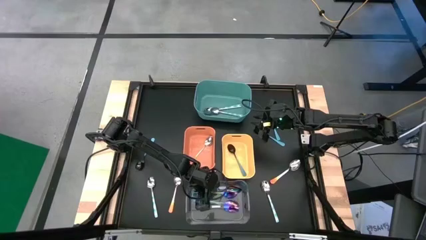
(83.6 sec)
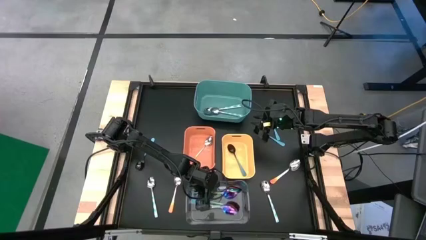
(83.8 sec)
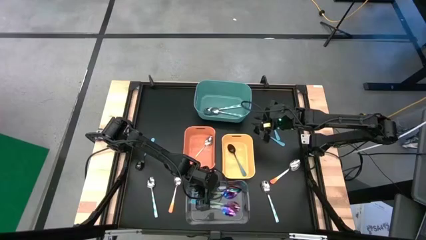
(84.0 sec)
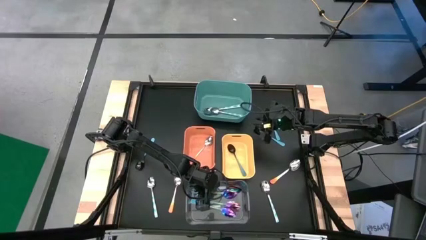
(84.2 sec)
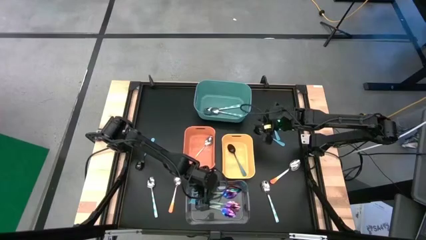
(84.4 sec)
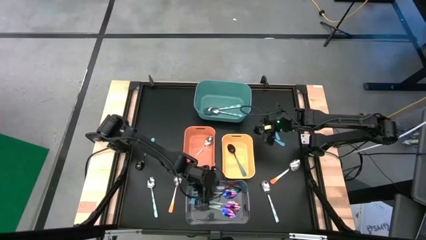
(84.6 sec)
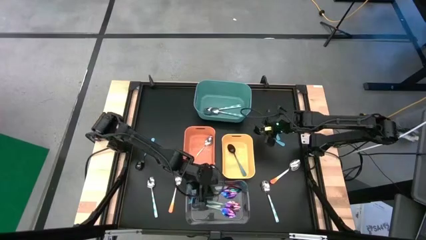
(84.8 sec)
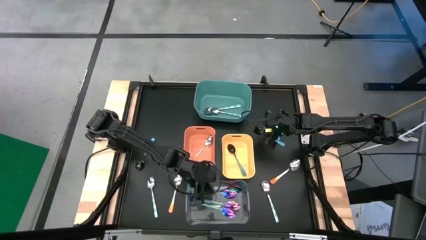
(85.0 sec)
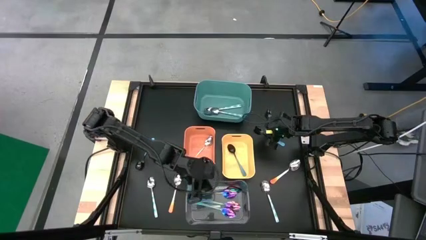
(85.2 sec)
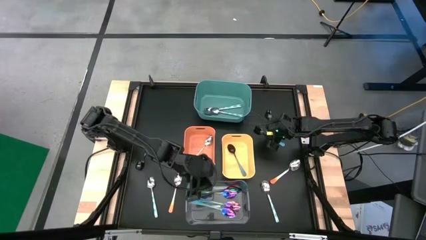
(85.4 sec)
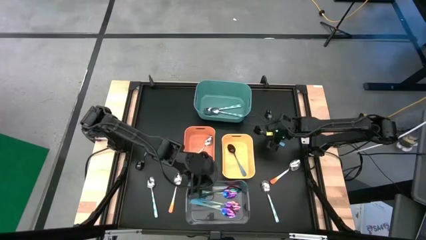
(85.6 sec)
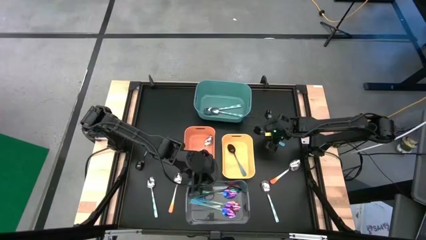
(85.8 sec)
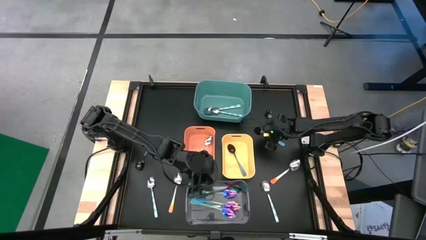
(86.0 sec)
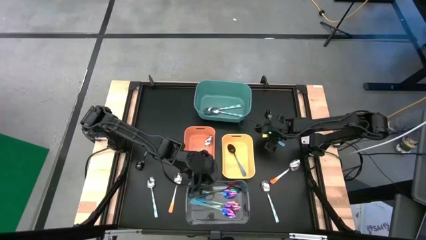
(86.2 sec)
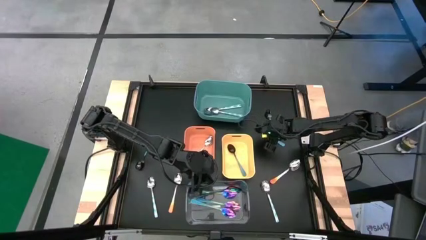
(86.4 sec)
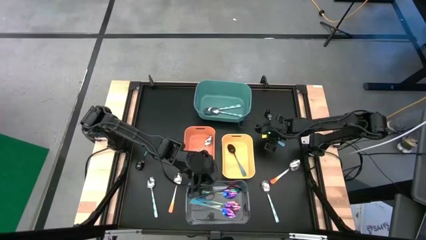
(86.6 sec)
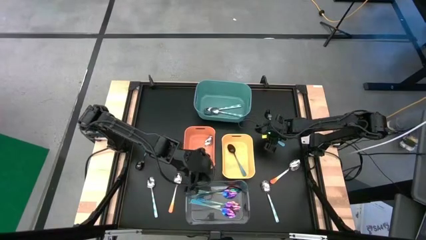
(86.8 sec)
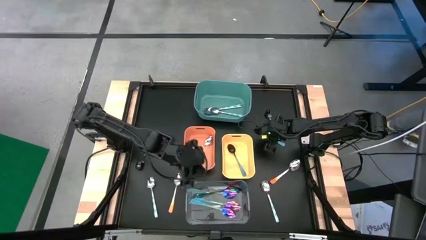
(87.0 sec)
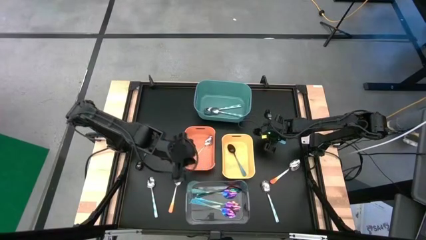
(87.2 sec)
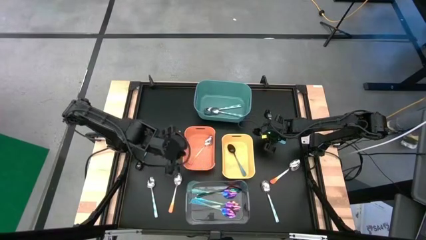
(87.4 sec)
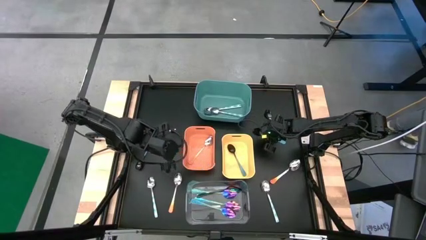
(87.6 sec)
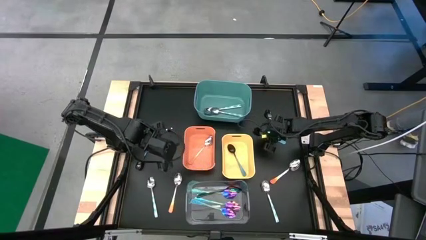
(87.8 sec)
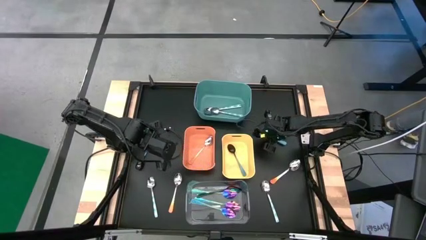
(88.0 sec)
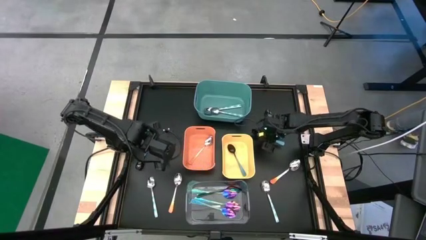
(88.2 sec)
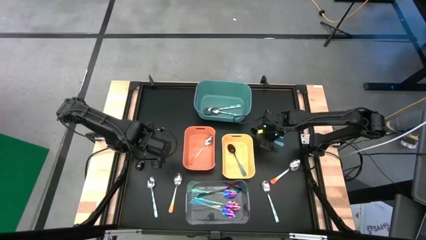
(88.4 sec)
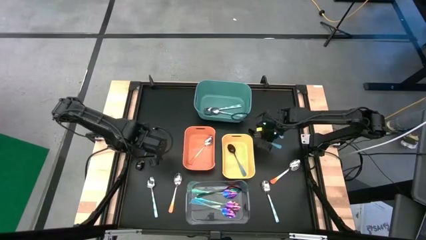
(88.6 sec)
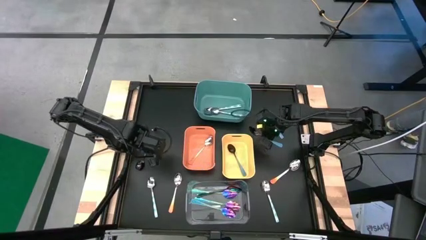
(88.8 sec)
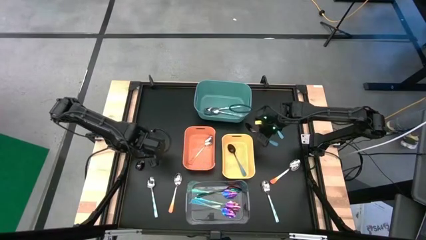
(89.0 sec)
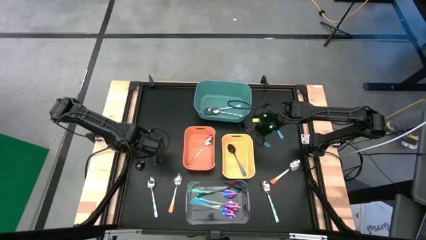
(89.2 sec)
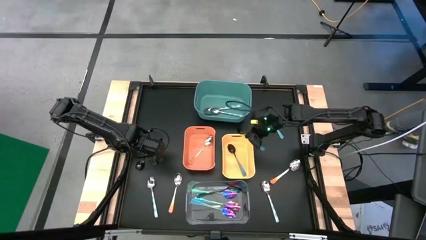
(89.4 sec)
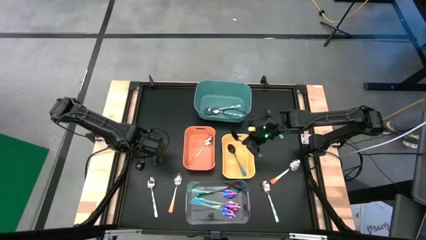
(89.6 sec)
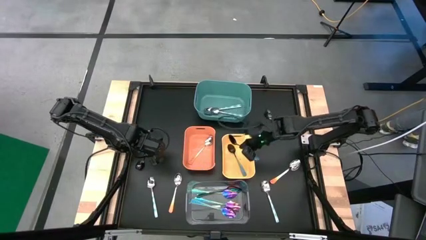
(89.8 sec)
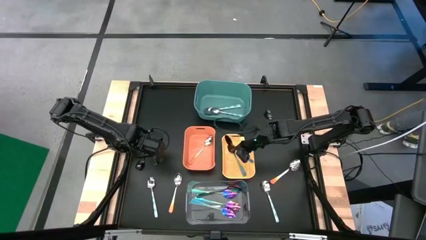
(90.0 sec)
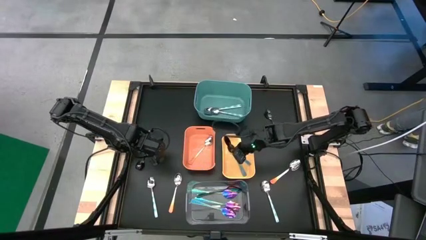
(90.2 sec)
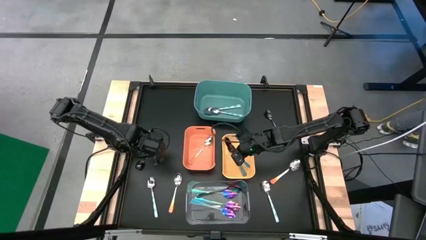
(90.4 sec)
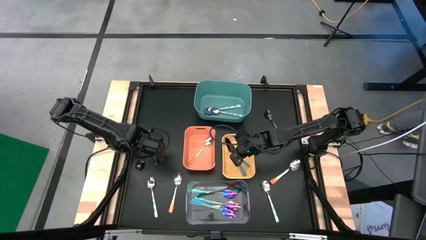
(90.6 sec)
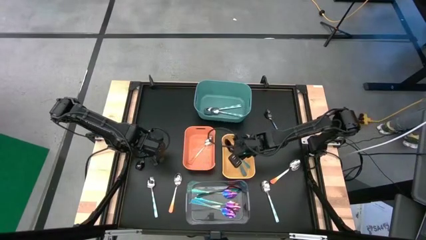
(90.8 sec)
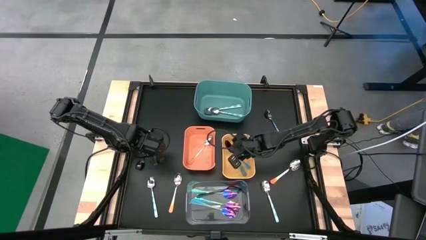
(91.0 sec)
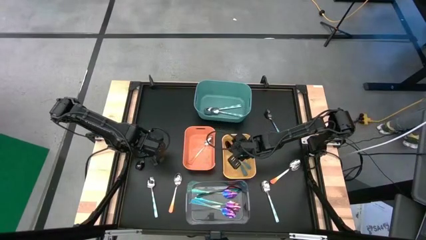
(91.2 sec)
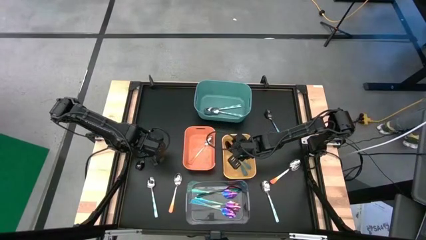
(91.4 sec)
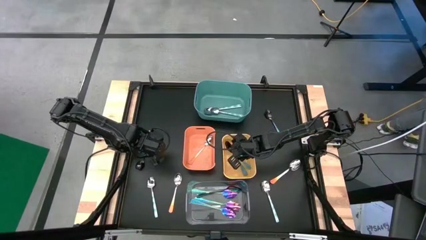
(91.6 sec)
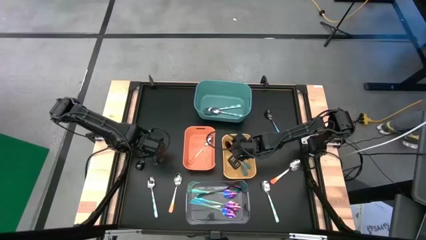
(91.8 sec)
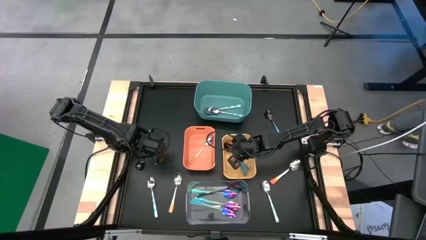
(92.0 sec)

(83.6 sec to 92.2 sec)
Task: Sort silverware by color (type)
Put the light blue spoon into the yellow bin

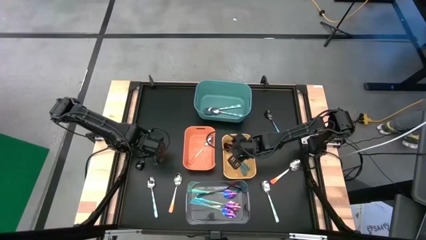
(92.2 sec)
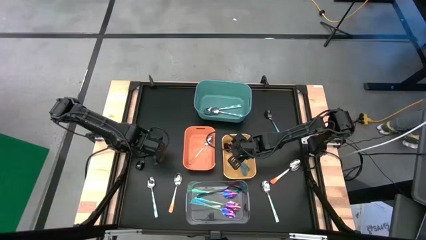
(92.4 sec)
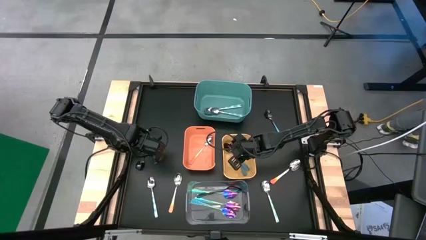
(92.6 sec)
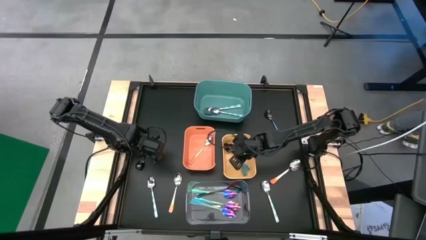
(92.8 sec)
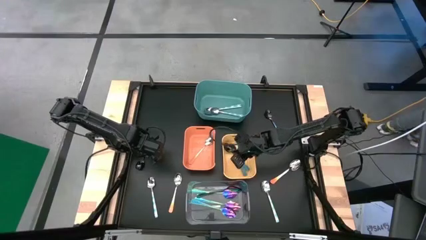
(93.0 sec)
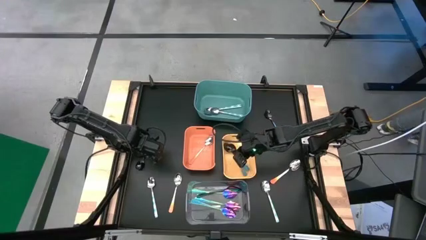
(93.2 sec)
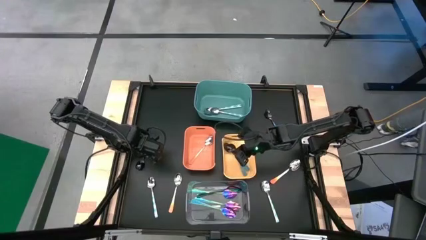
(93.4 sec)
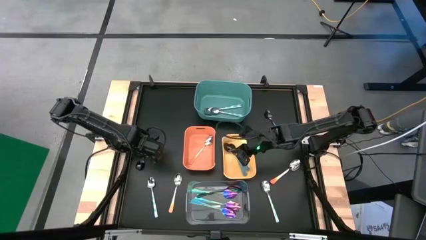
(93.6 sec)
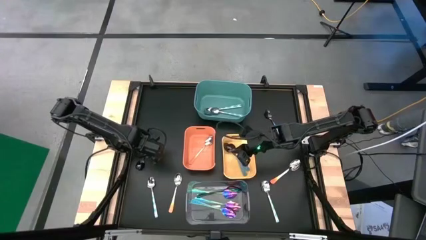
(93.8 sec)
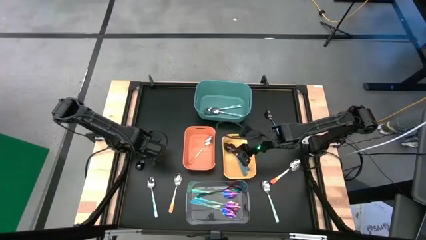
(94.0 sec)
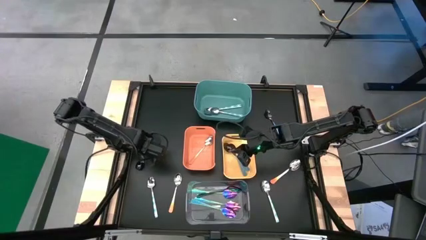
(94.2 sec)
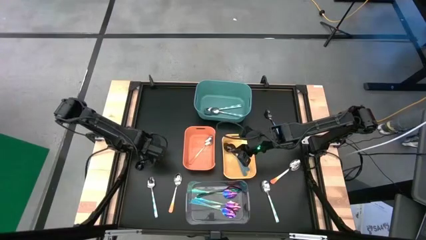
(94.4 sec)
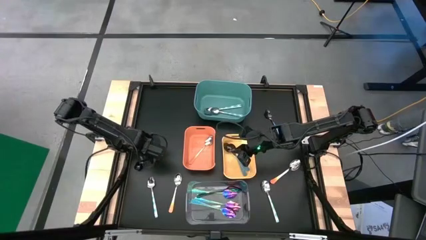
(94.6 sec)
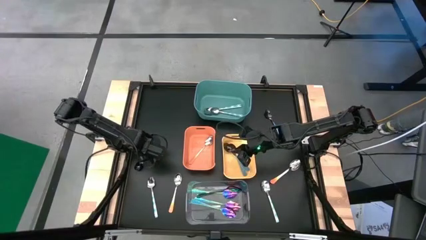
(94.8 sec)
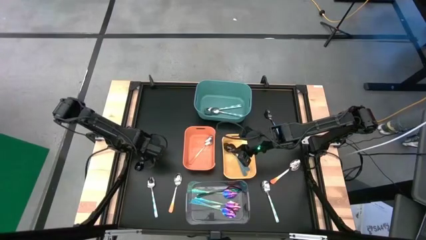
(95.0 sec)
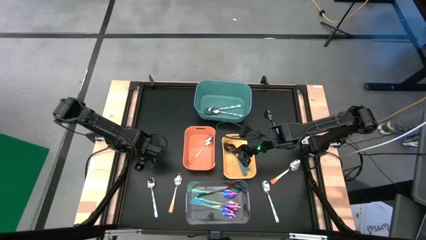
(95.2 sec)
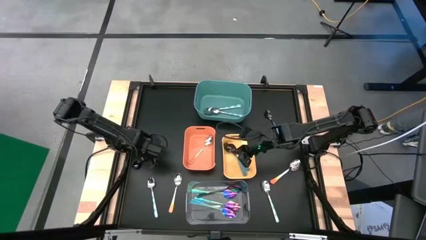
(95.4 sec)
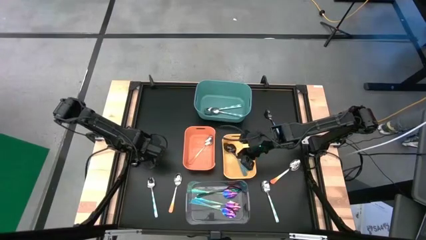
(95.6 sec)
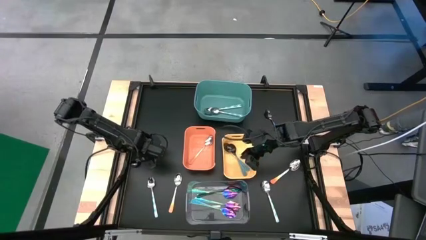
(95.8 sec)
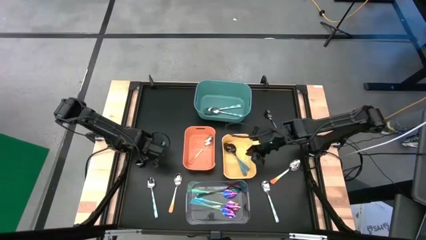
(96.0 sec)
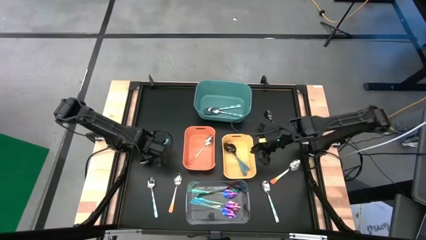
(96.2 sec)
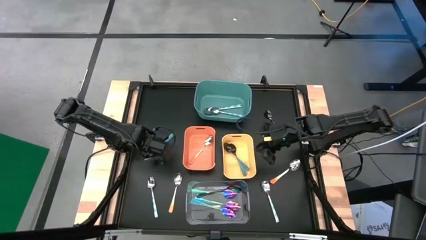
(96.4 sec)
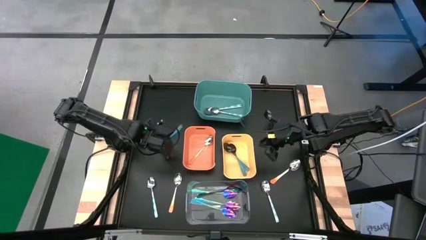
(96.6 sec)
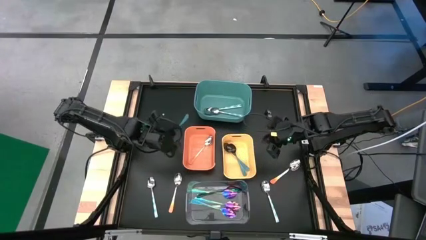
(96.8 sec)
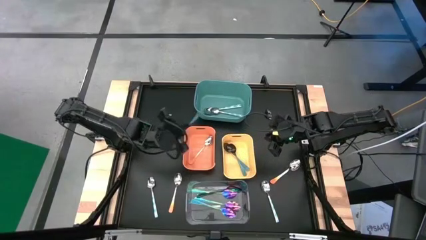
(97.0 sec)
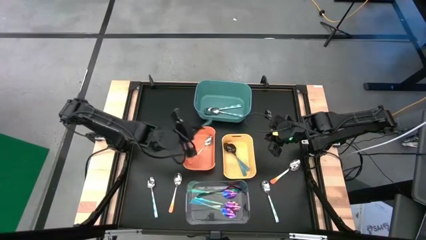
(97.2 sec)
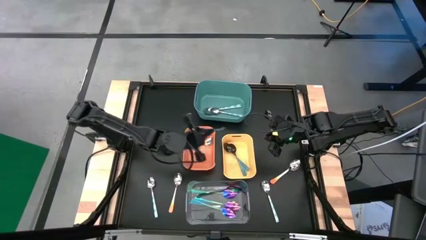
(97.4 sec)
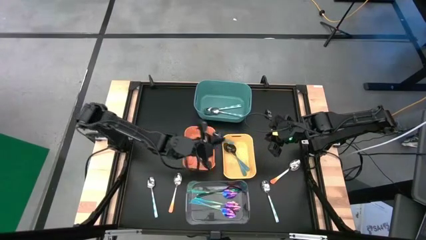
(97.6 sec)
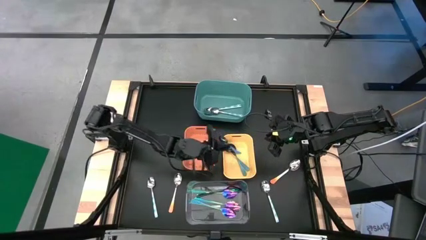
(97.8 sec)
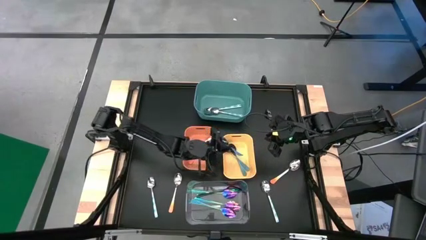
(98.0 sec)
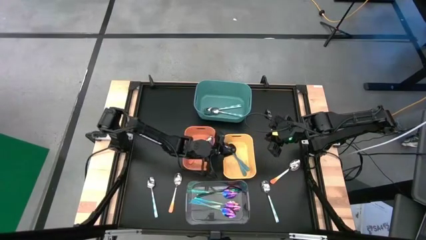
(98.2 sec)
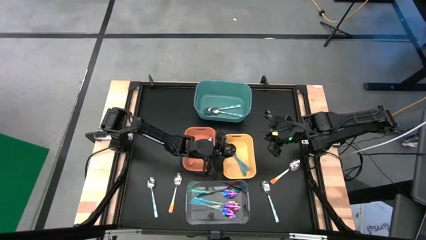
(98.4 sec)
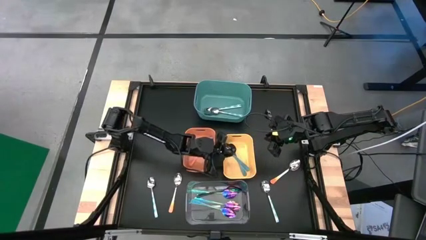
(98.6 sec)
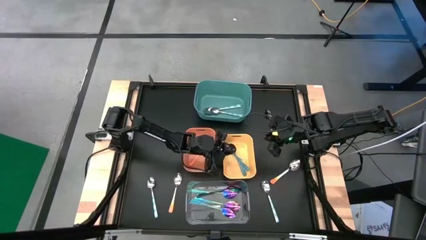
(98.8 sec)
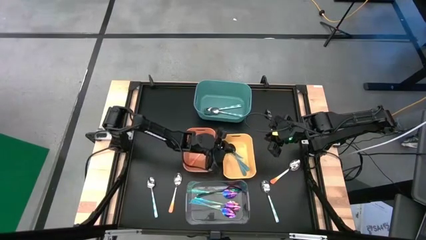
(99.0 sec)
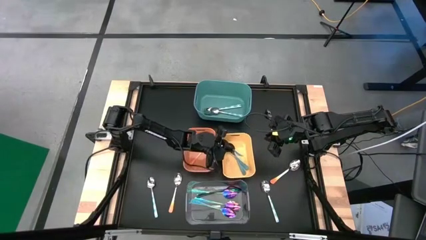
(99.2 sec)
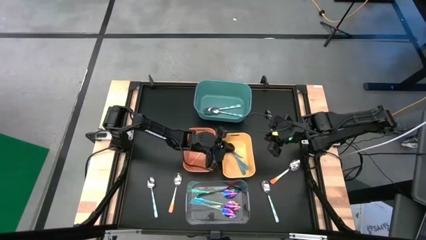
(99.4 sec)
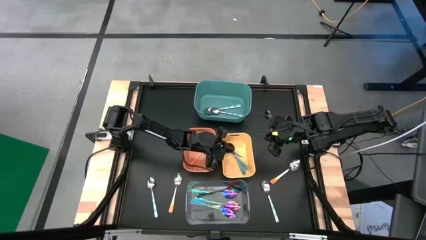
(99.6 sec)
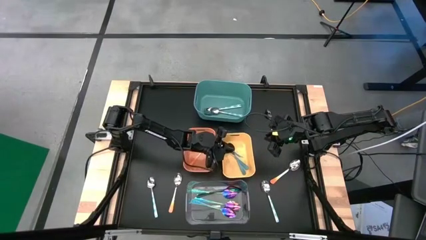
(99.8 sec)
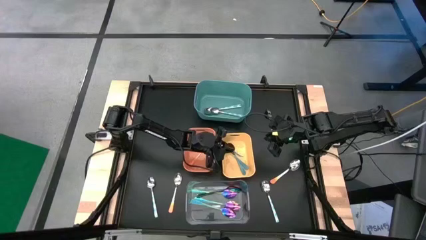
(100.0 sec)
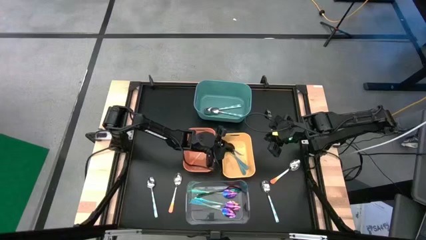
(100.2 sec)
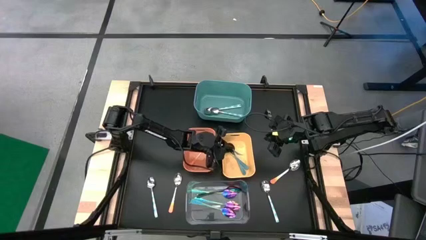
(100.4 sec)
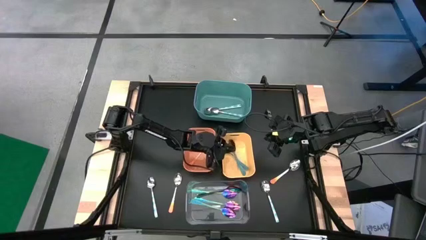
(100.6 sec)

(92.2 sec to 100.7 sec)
Put the light blue spoon into the yellow bin
